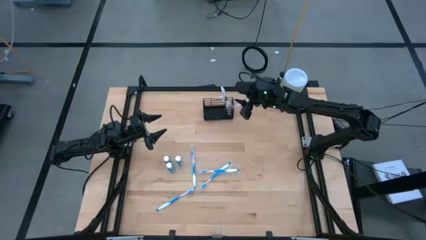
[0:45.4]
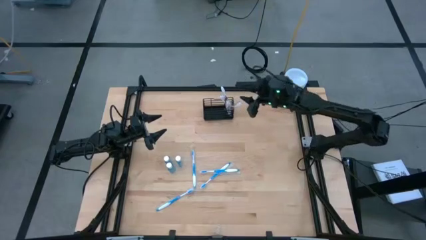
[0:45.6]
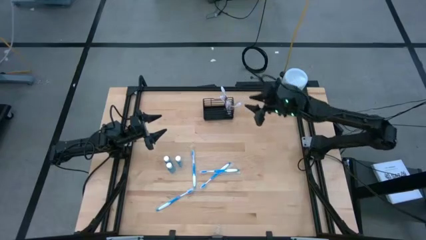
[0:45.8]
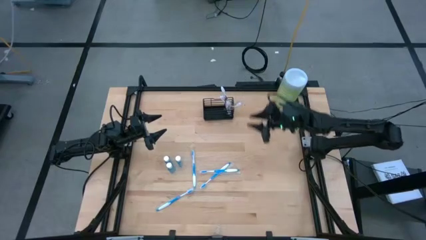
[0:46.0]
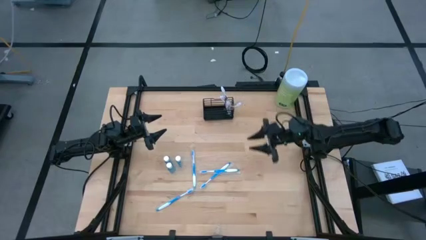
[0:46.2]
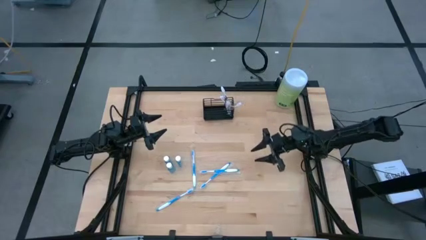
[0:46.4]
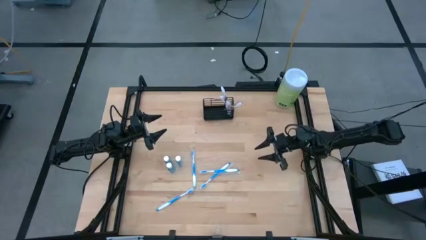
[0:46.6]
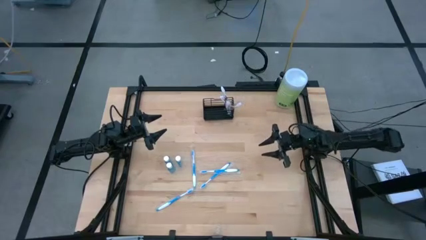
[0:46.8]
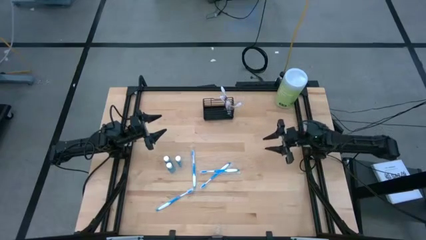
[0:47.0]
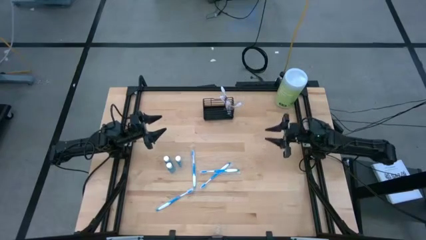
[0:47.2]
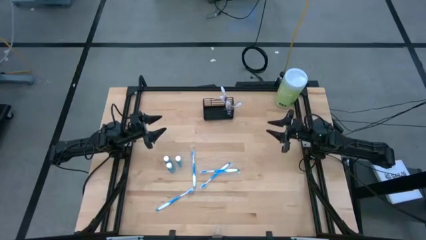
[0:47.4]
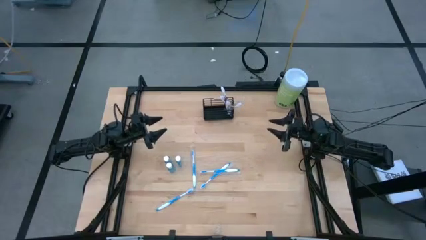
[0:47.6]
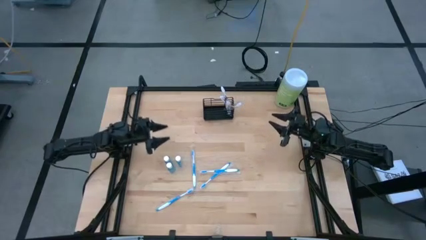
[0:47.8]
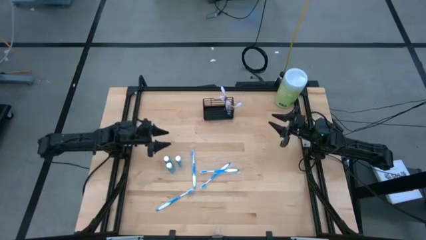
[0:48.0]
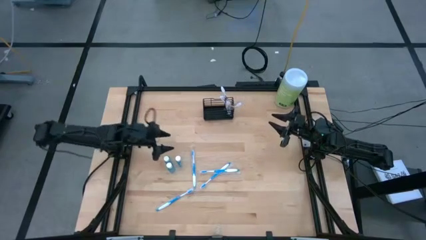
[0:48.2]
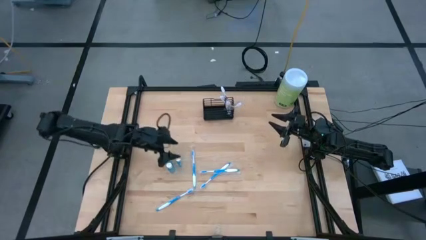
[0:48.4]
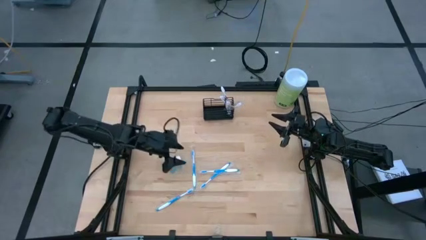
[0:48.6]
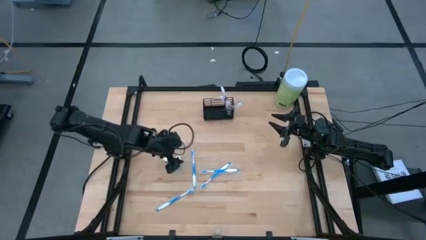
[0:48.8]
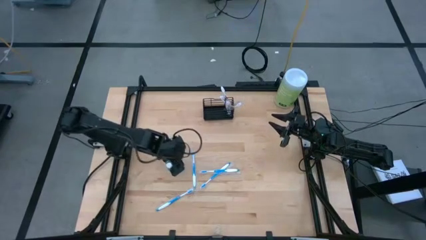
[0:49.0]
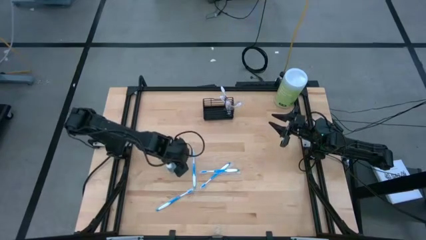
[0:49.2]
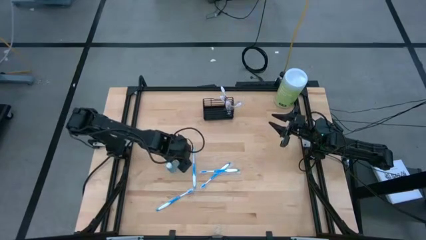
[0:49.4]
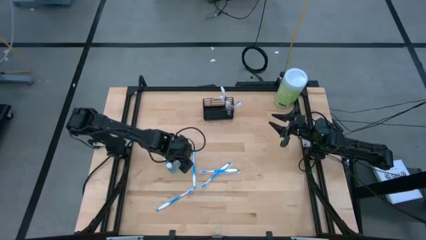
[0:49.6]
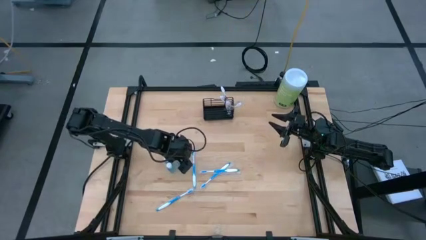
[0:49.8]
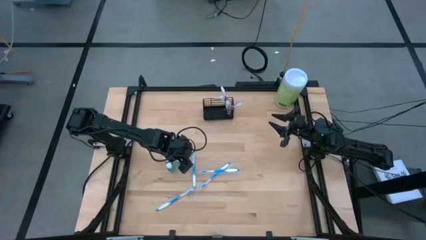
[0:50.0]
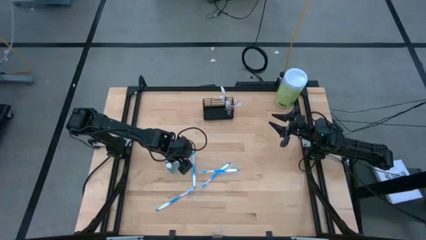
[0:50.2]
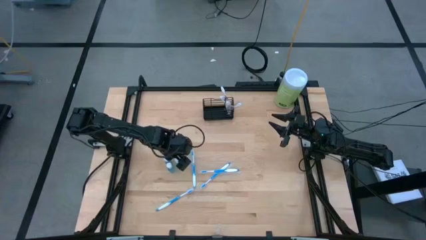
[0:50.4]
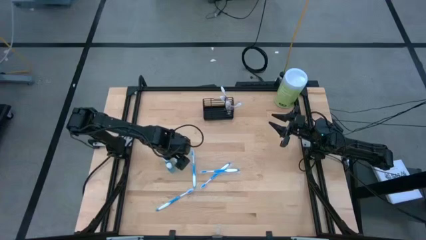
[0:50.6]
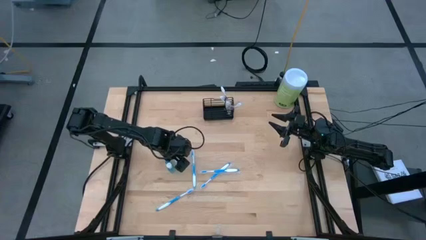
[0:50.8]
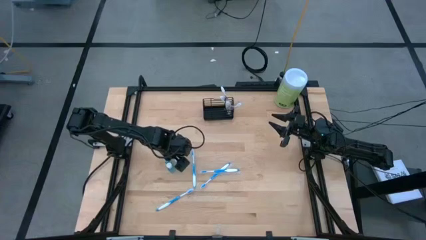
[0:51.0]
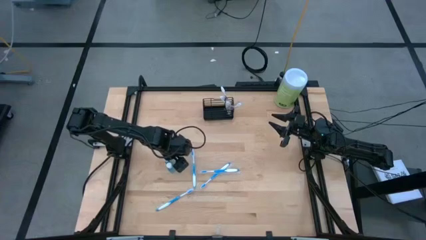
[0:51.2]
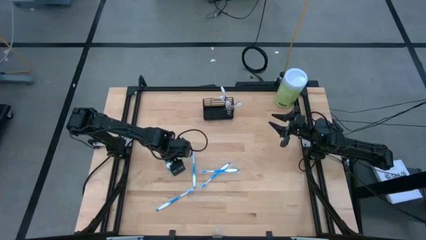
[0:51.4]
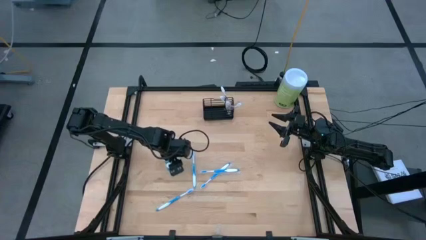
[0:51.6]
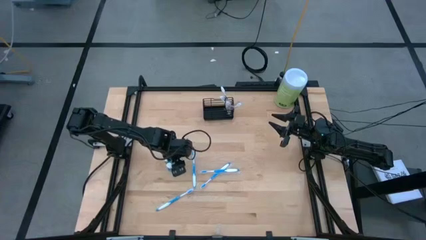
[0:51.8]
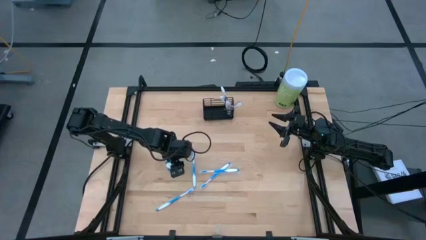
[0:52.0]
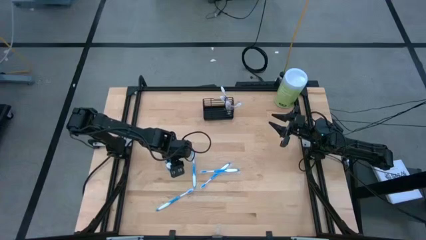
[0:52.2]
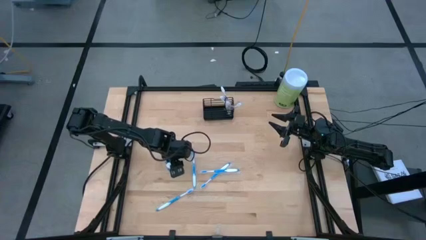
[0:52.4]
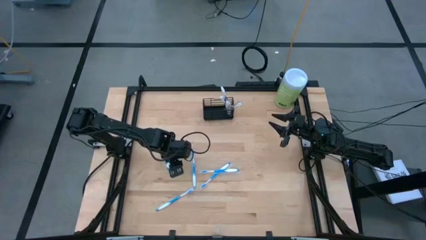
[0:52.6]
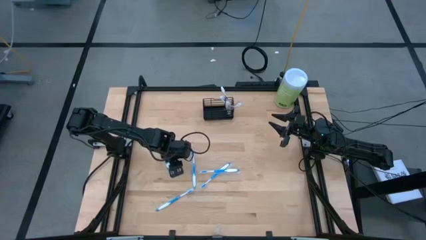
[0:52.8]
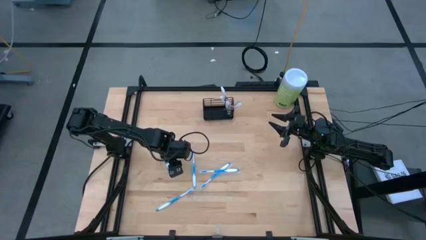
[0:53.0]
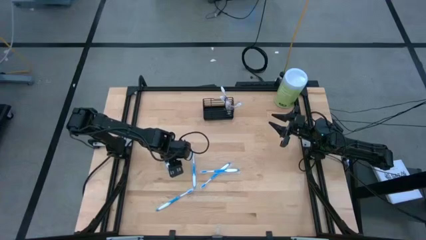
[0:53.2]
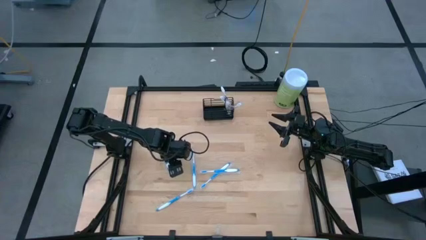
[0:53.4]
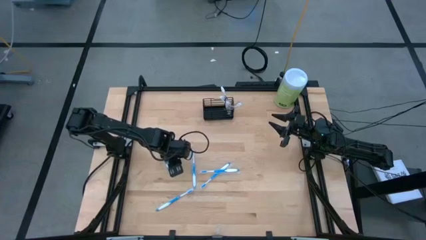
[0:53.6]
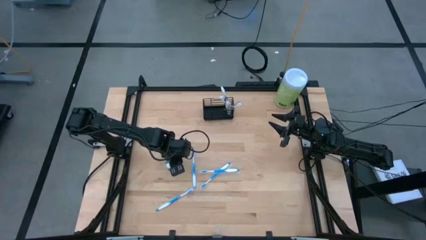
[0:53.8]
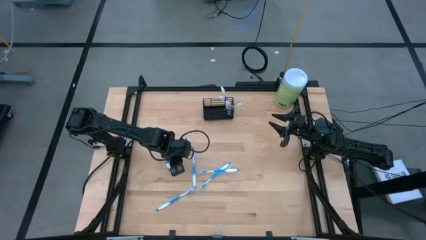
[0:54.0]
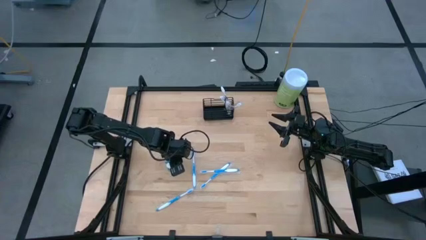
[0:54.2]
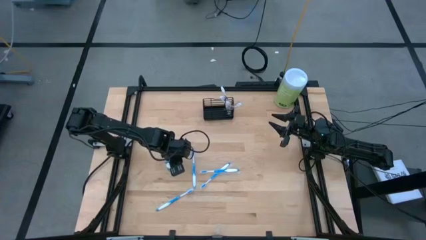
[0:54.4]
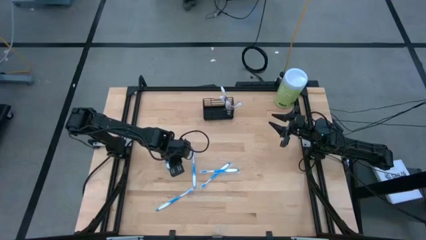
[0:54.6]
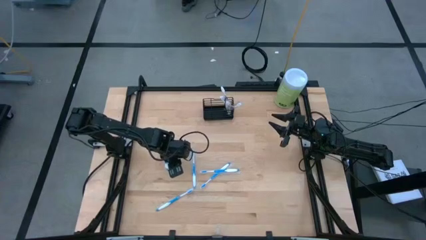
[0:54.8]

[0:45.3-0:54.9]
Task: Pick & Place toothbrushing station
Put the blue mouthwash into the middle compartment of the wire organizer

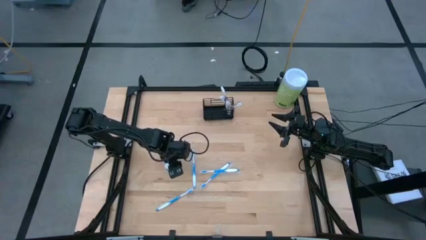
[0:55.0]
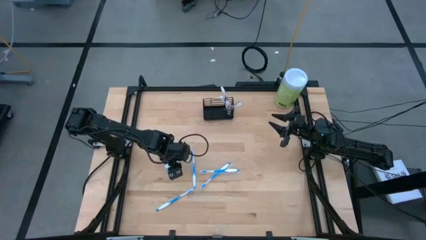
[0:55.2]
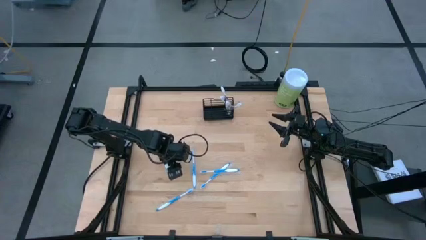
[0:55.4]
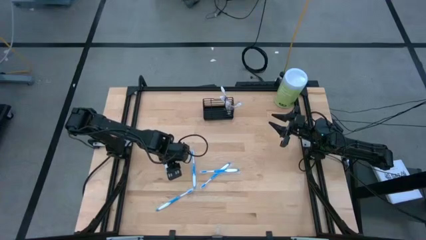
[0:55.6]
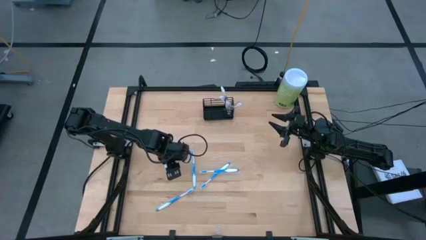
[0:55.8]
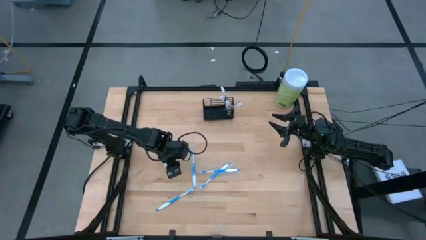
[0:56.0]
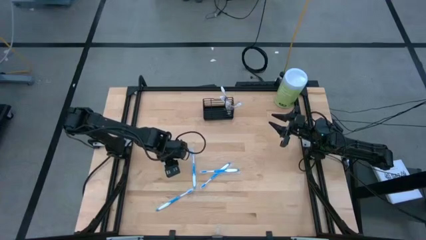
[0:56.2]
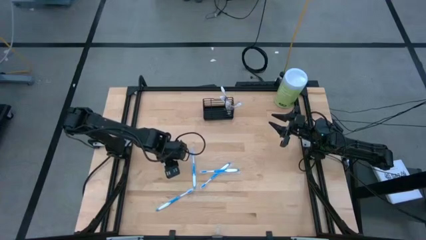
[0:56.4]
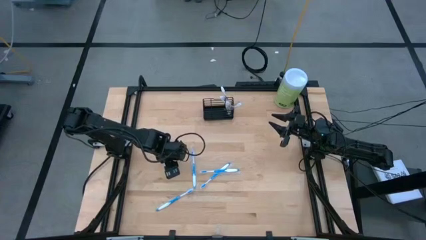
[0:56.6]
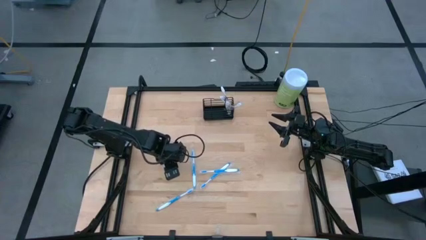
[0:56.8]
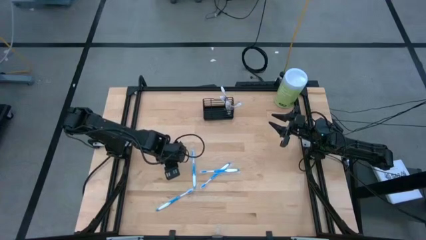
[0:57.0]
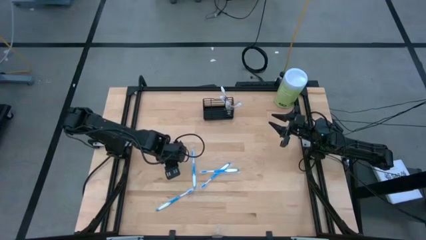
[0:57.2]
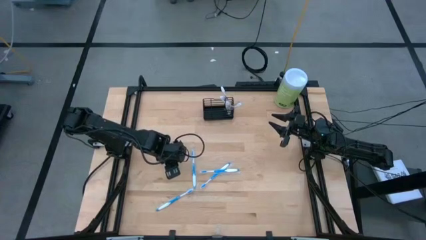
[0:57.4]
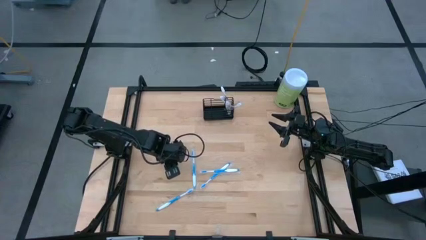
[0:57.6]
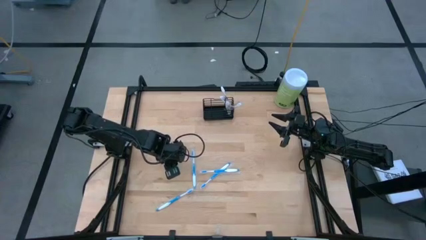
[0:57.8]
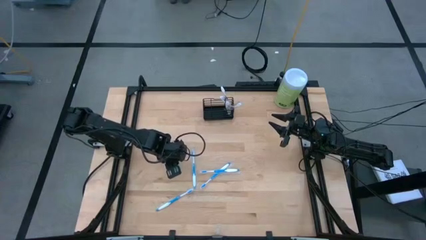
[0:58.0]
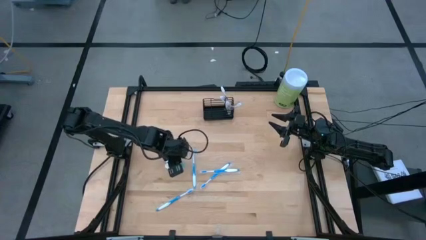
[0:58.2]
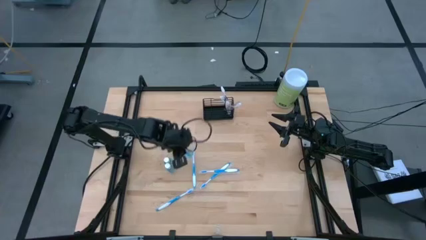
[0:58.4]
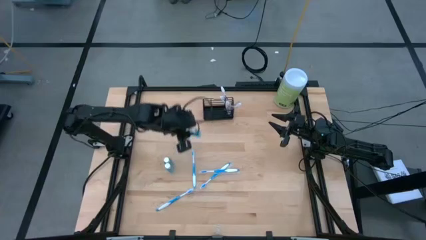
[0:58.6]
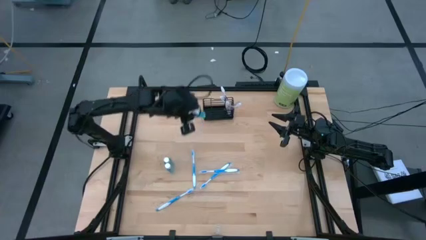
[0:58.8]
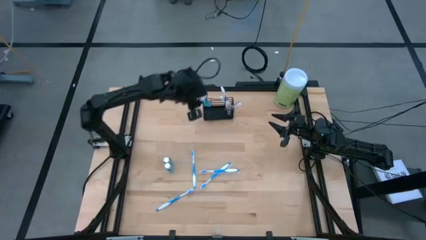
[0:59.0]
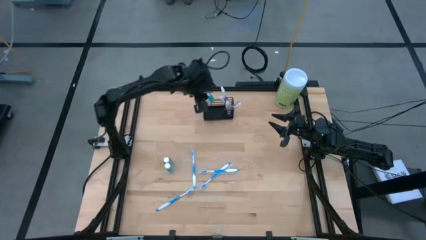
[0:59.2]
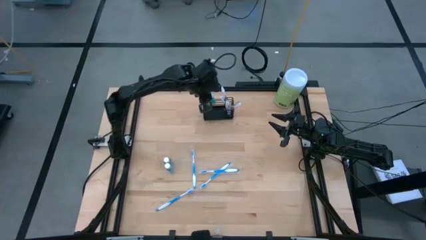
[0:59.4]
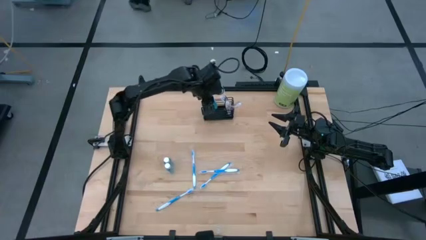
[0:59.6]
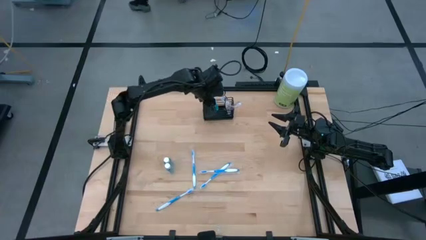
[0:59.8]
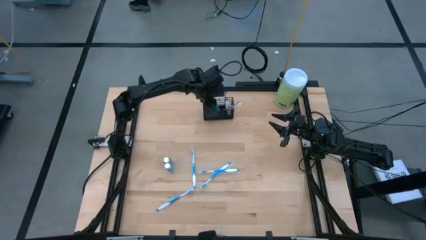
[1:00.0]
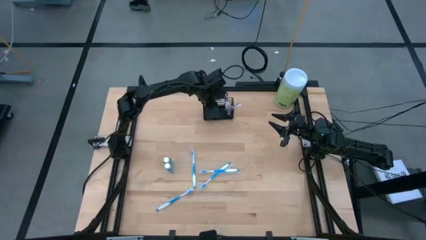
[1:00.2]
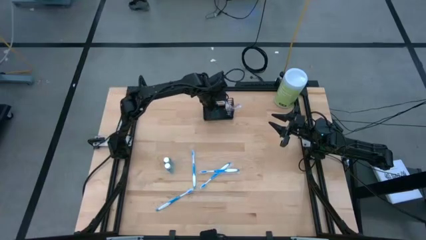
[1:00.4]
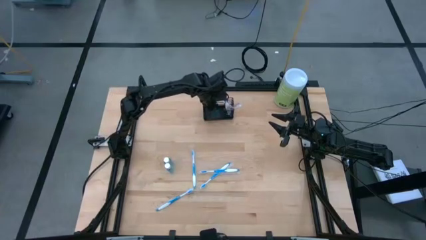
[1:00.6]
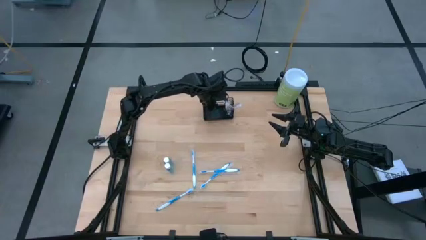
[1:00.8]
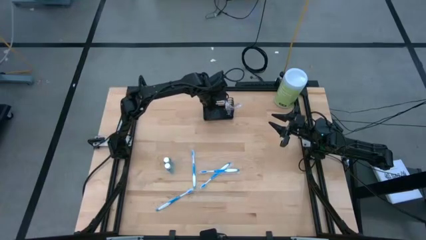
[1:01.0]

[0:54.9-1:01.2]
Put the blue mouthwash into the middle compartment of the wire organizer

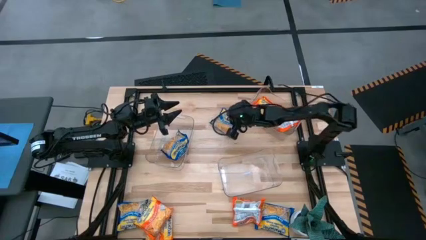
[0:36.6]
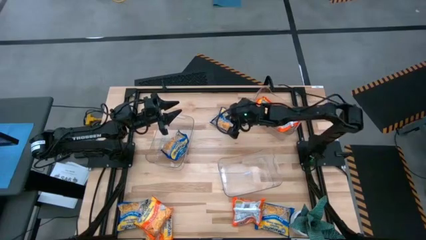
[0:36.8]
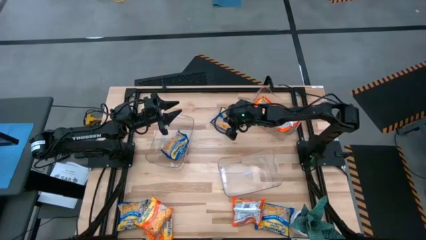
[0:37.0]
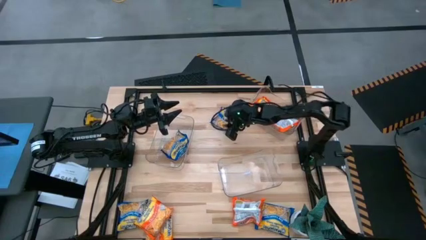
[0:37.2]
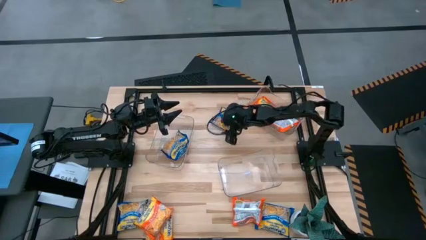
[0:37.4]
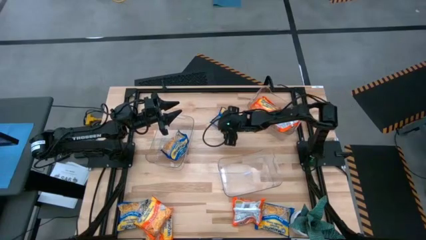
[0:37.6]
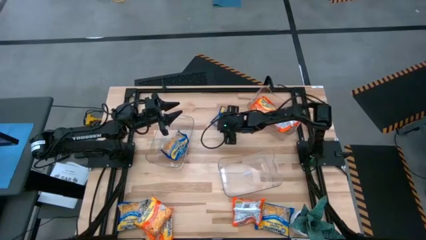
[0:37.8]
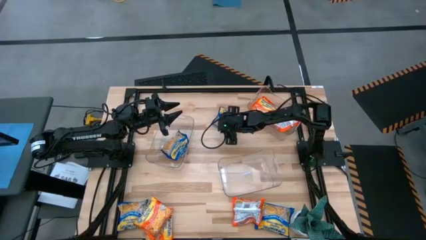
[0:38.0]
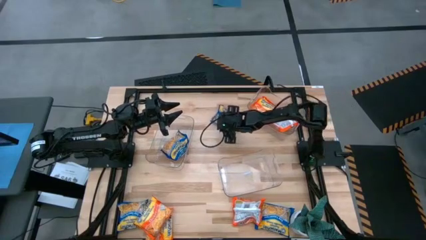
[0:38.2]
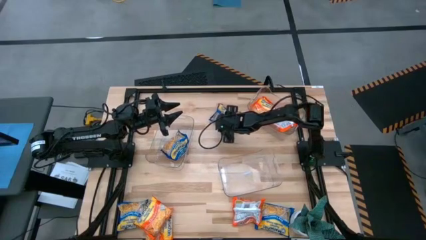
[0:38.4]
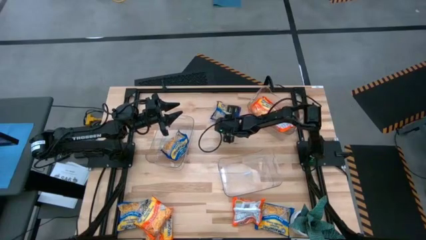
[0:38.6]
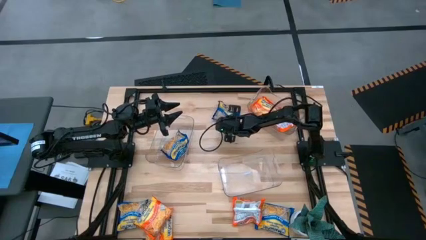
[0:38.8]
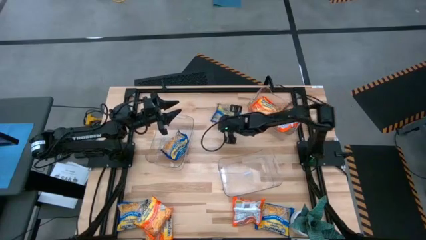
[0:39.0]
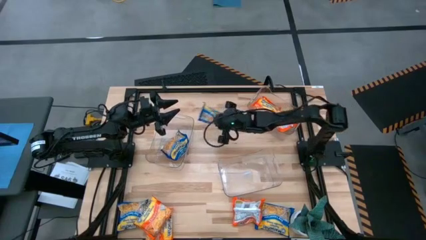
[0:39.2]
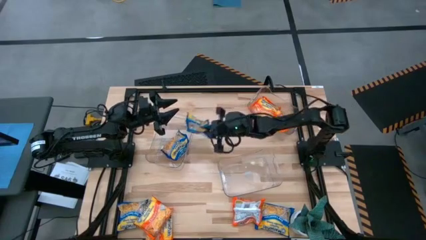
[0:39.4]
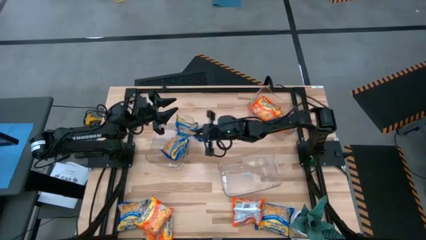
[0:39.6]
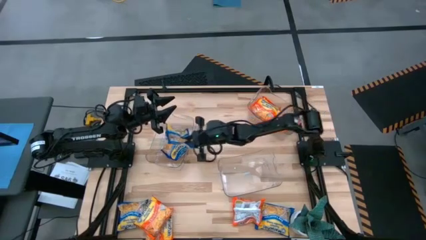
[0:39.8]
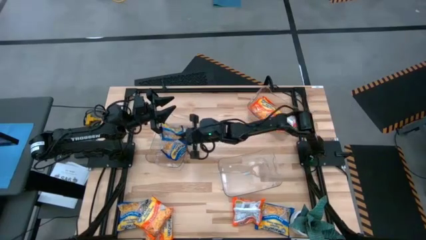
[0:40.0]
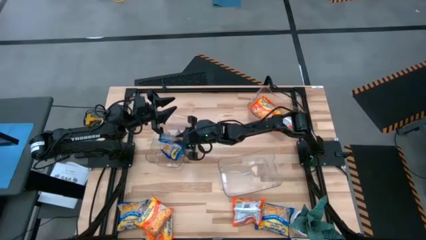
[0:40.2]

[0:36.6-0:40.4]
Task: Sort Maruchan noodles
Put the blue noodle pack into the middle transparent bin
